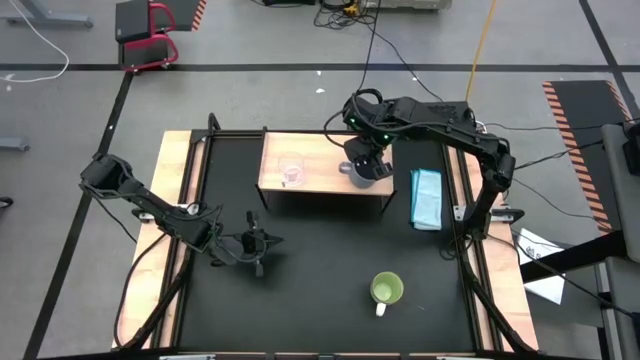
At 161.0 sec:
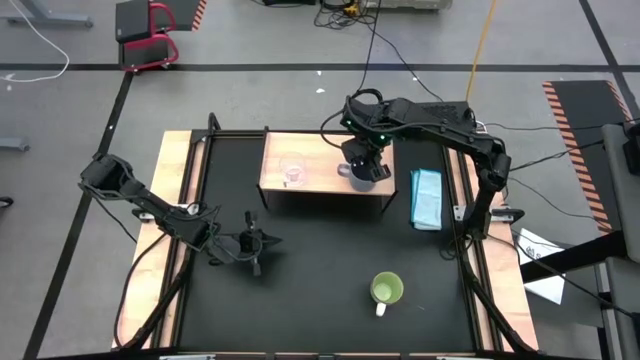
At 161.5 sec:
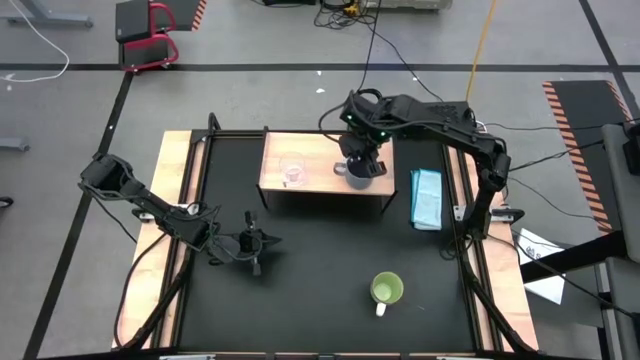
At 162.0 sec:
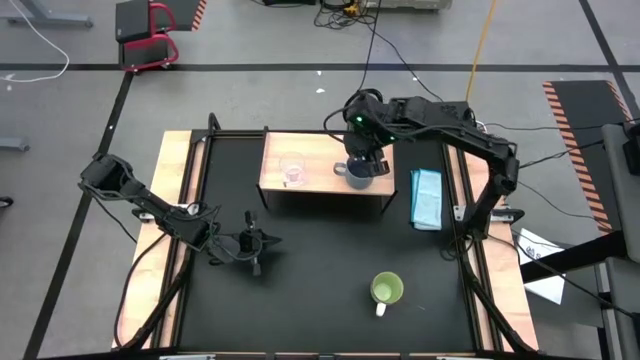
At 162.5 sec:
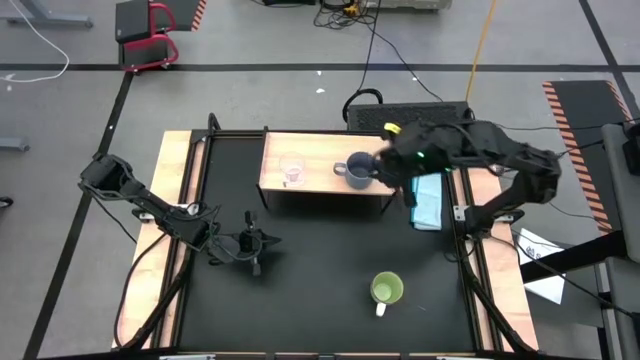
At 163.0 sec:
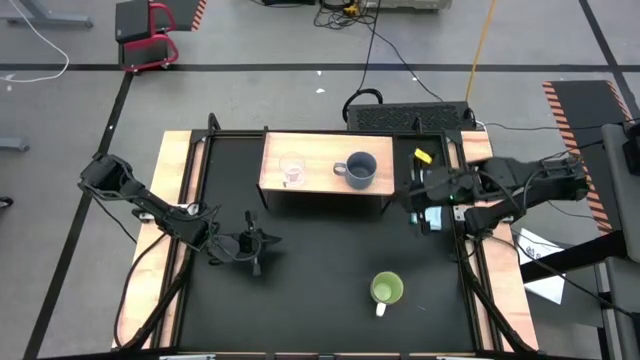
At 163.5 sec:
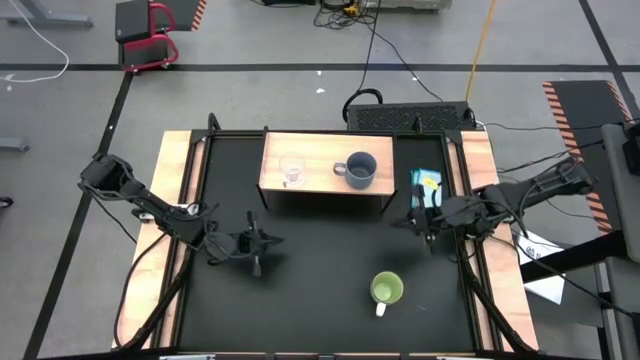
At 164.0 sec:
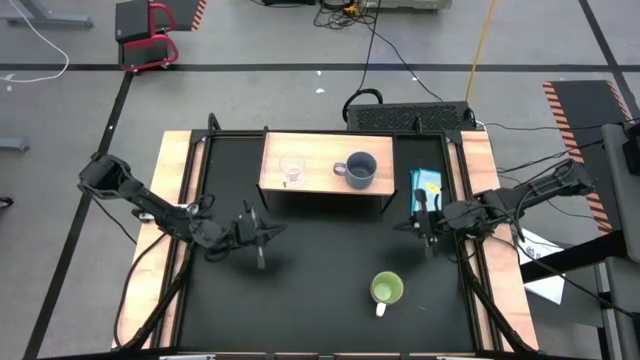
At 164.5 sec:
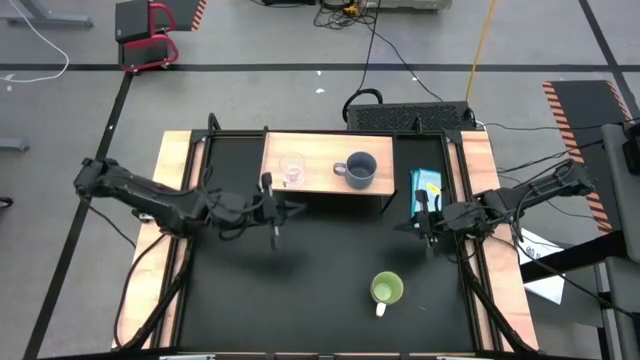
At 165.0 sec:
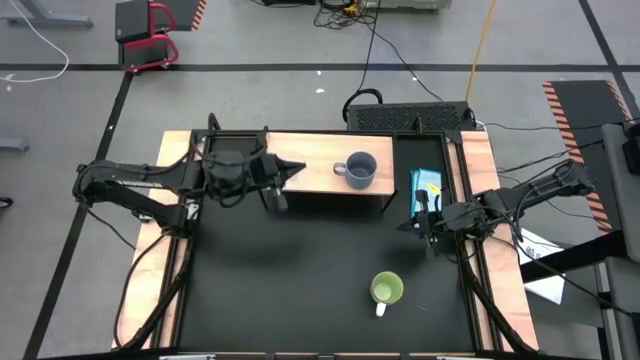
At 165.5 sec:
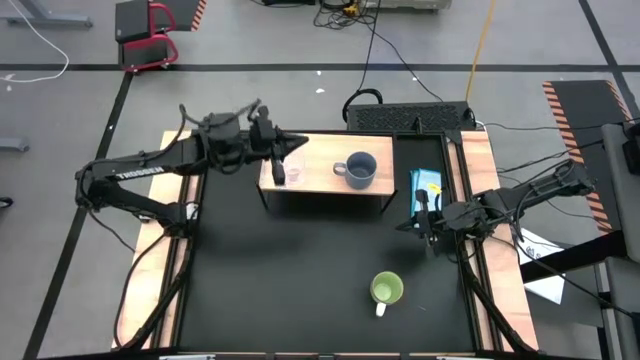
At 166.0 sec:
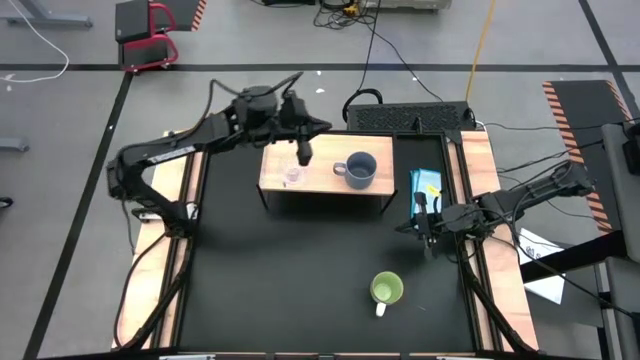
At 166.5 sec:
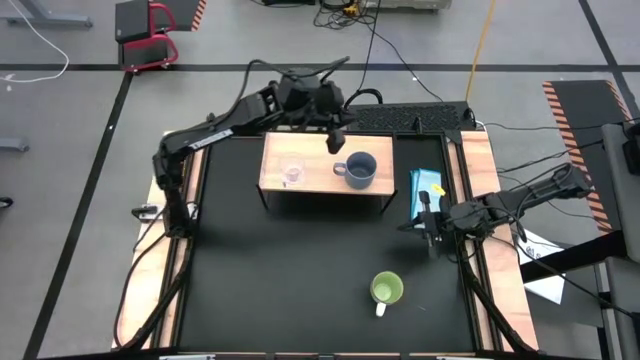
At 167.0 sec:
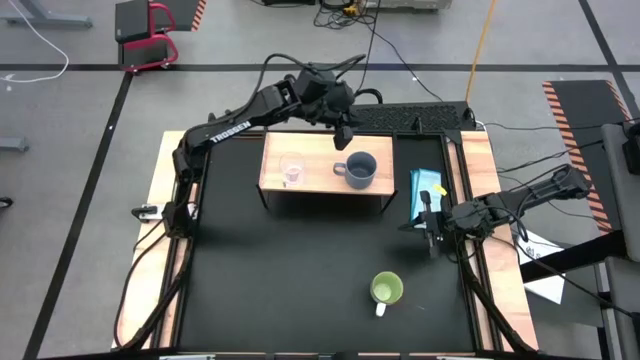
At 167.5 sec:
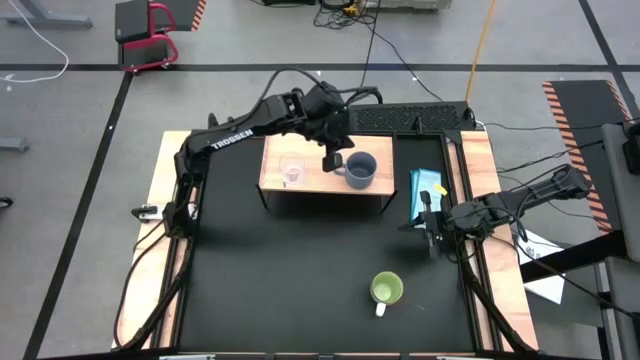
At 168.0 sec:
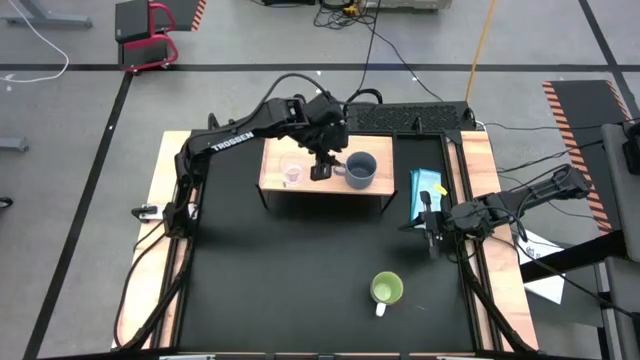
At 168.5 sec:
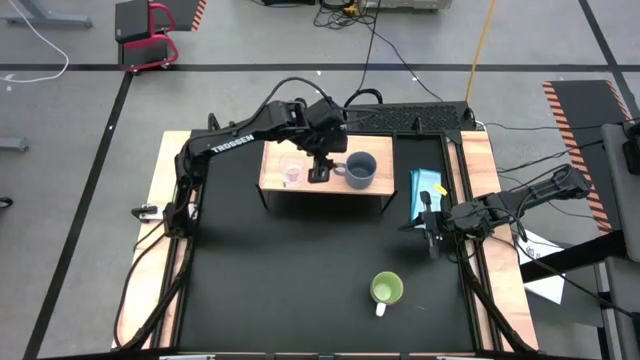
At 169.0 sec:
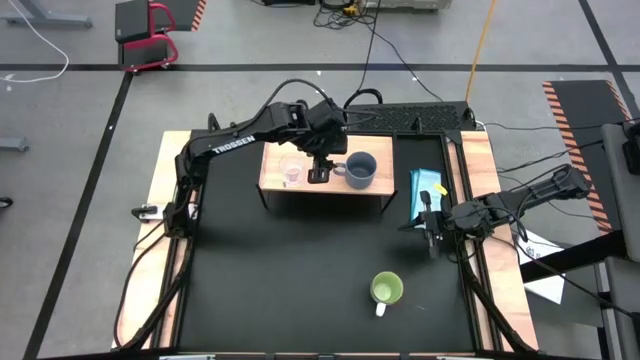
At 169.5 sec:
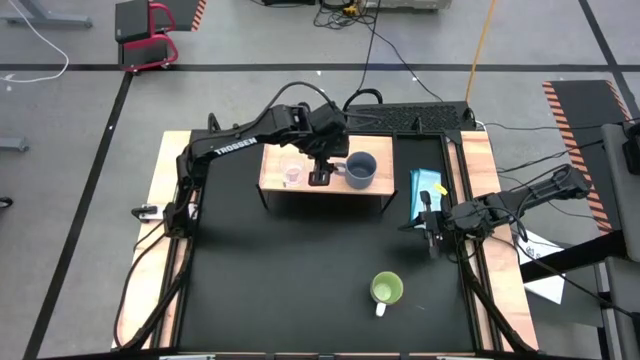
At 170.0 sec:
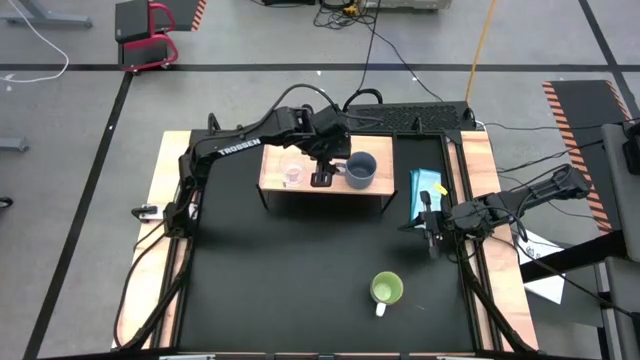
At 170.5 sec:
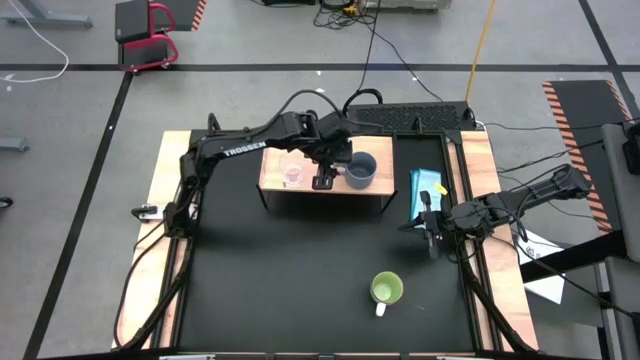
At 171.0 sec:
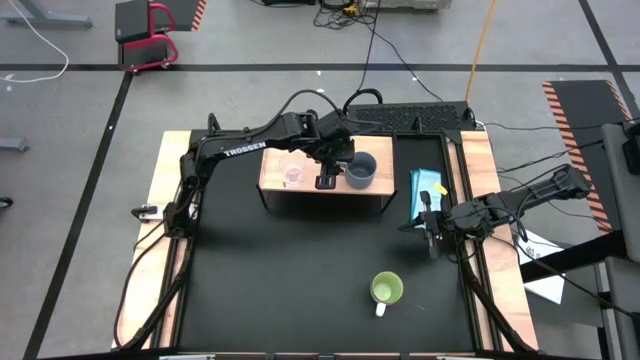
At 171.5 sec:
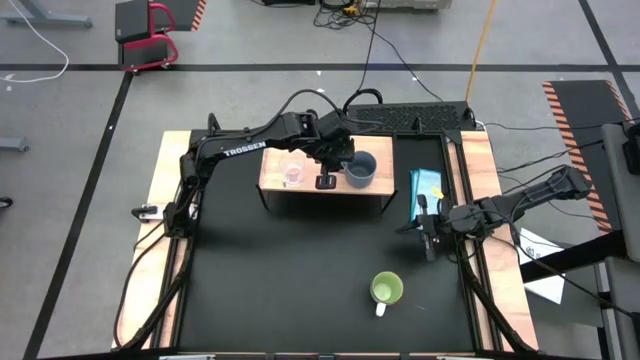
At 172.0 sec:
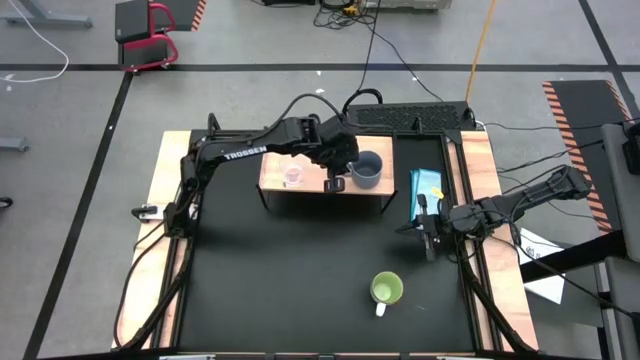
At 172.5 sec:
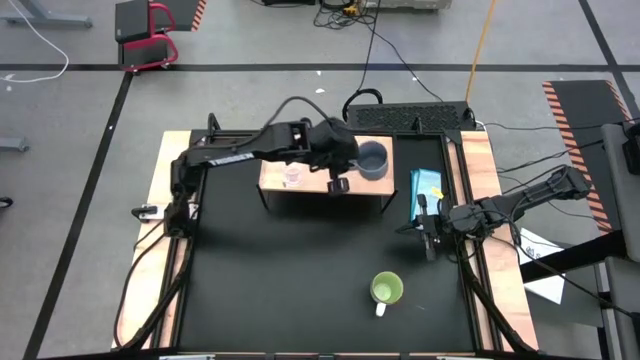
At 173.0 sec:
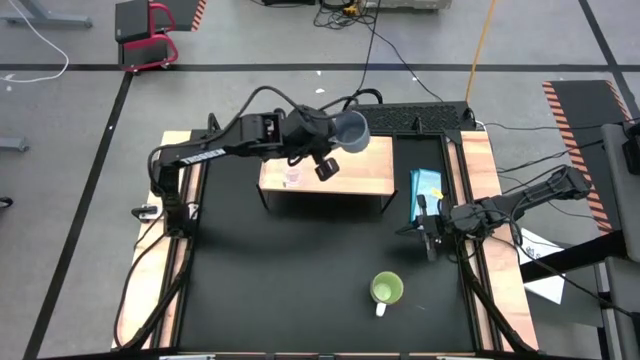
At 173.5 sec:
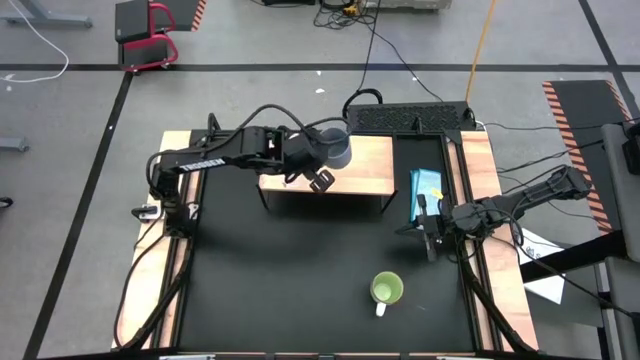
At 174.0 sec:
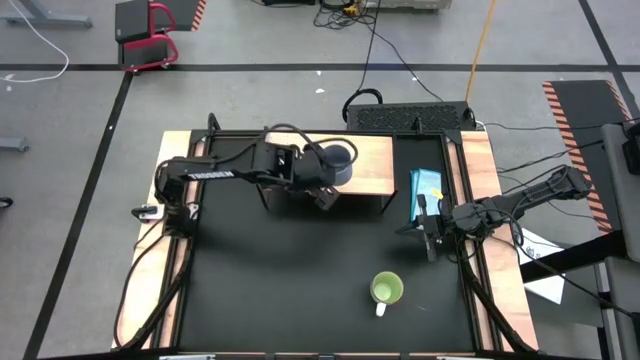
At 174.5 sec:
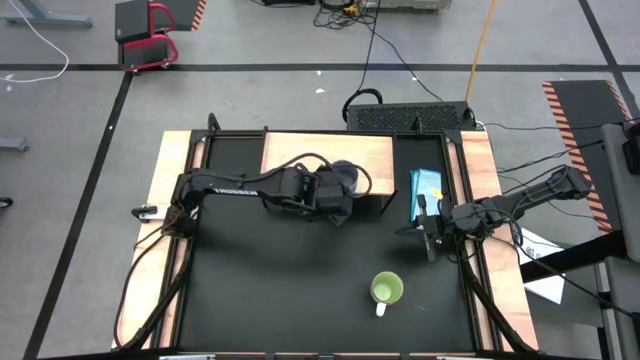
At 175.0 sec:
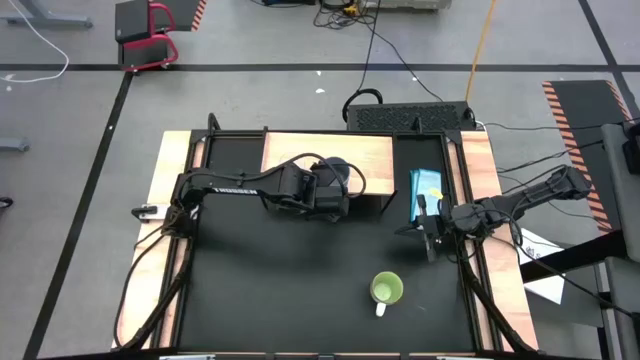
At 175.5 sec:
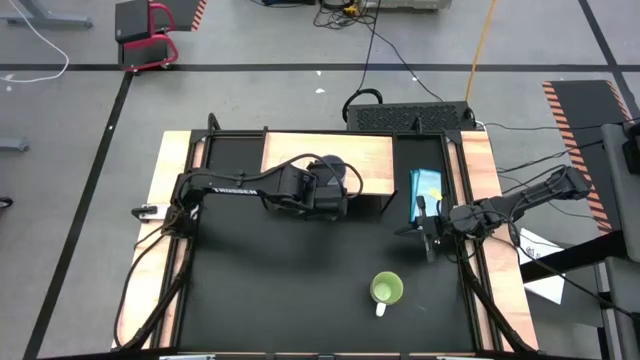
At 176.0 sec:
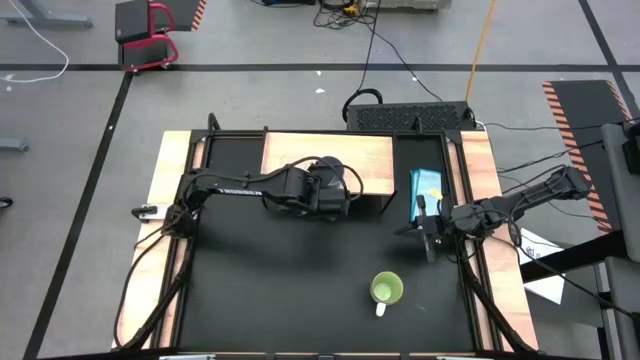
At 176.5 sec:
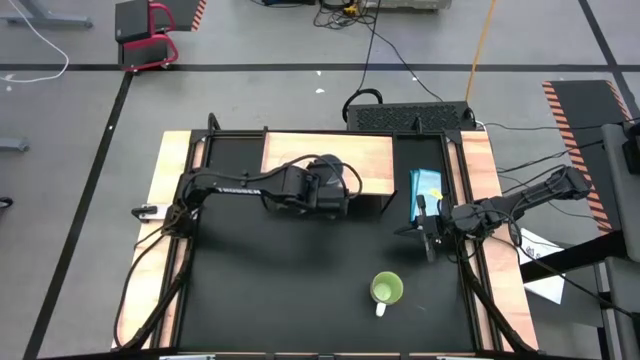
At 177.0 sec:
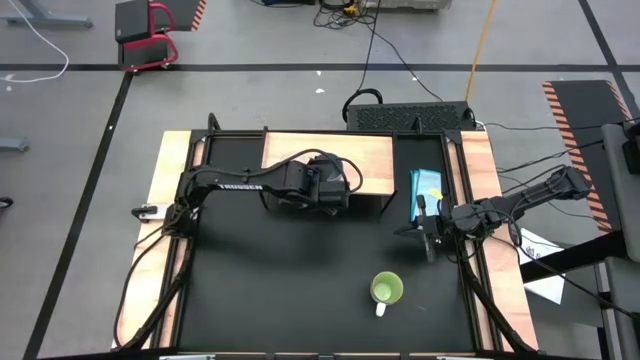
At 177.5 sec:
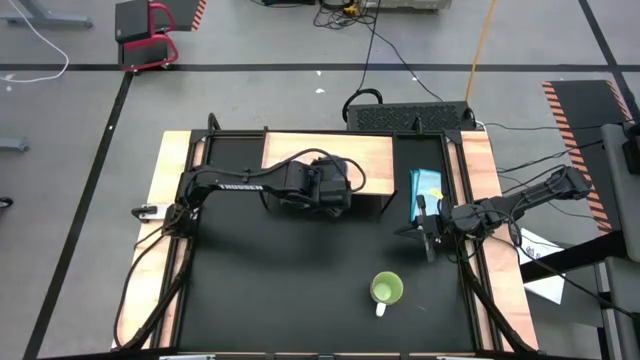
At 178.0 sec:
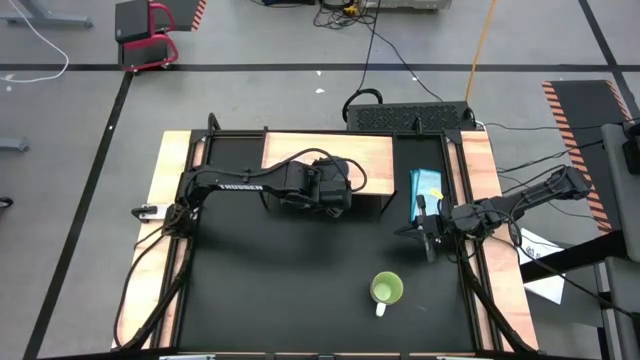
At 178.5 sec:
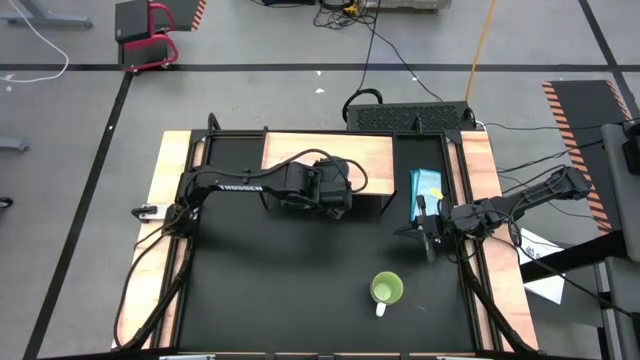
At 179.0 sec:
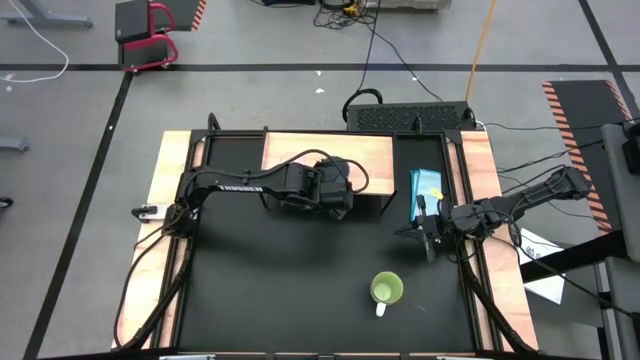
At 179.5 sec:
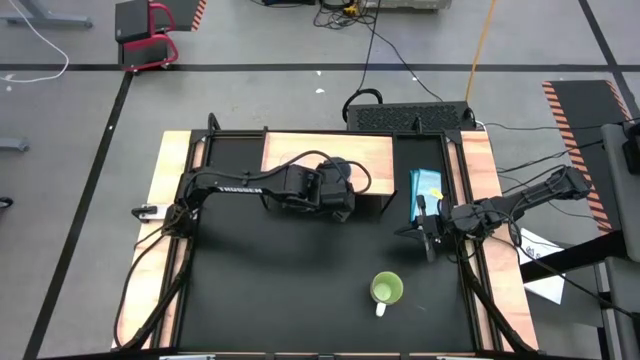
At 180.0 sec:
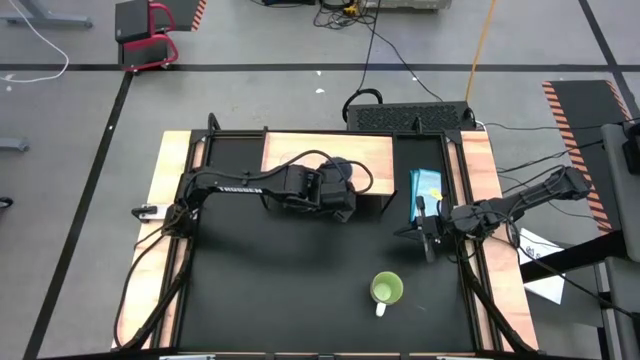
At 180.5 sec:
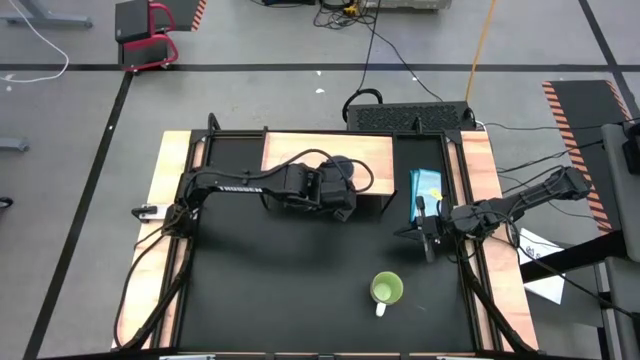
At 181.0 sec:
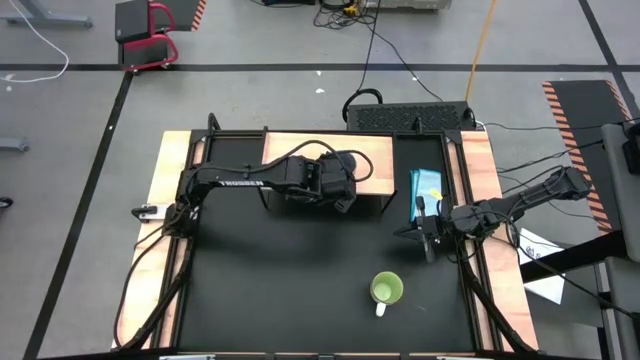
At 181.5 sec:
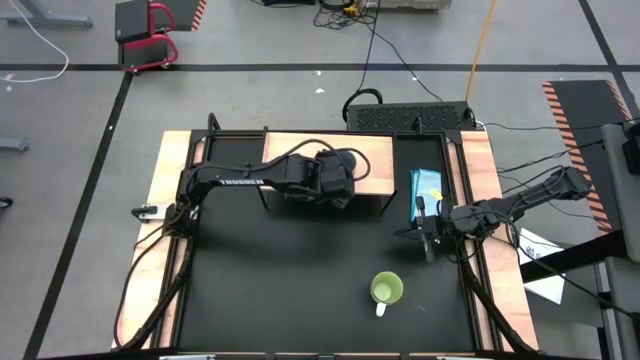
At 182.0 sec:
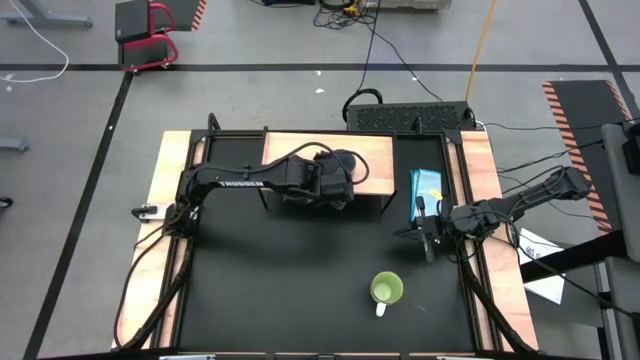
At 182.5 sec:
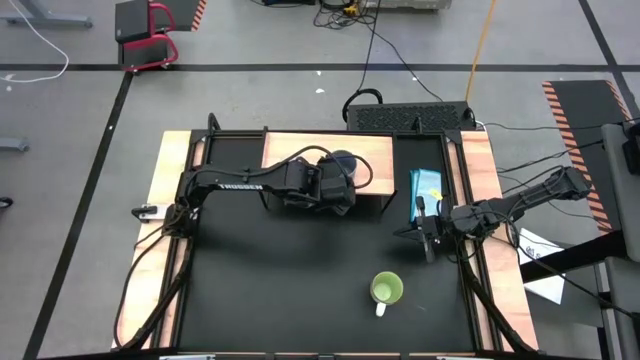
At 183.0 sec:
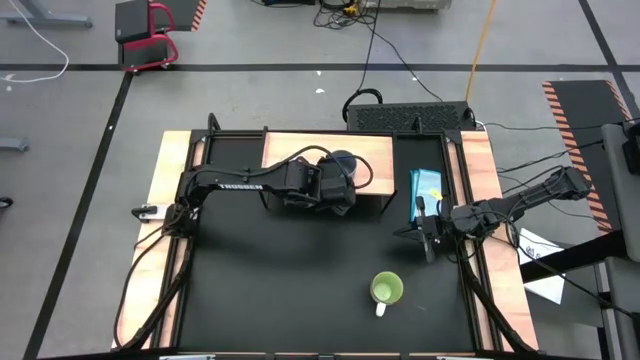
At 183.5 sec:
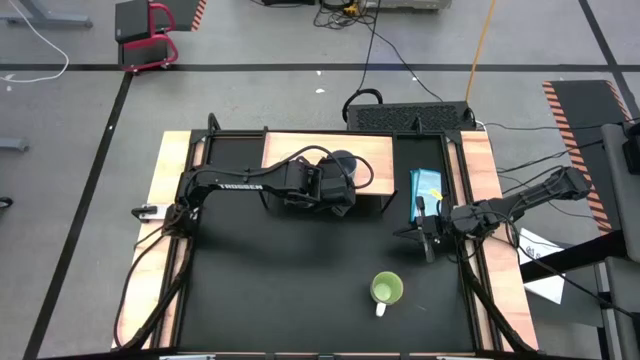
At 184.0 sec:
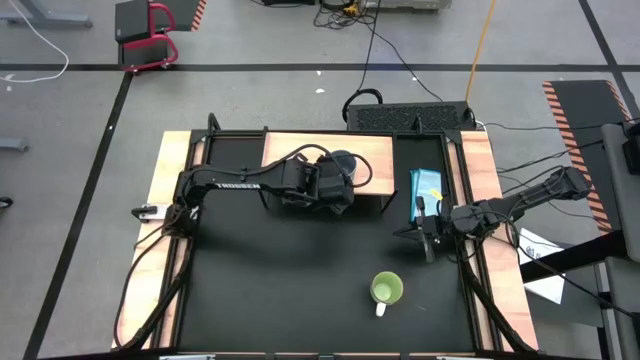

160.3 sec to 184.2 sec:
Task: Stack small to large cups/mugs on shelf
Put the gray mug on the shelf
